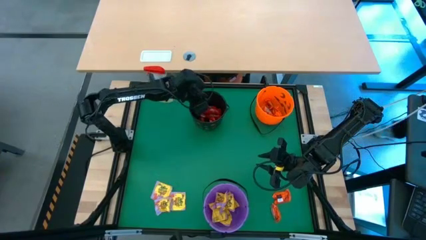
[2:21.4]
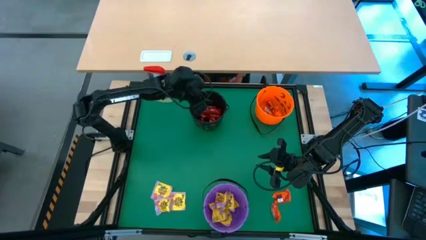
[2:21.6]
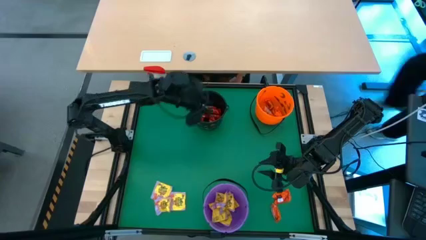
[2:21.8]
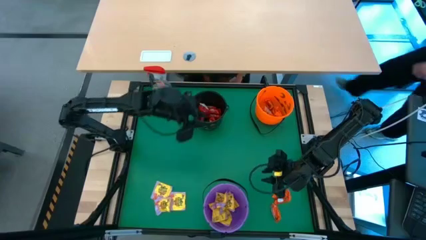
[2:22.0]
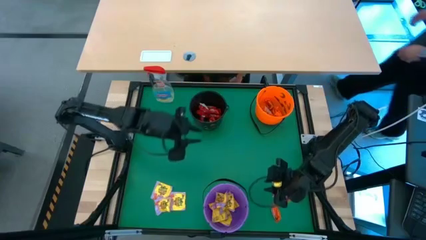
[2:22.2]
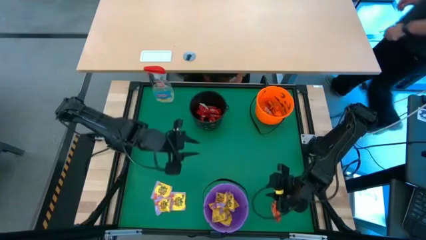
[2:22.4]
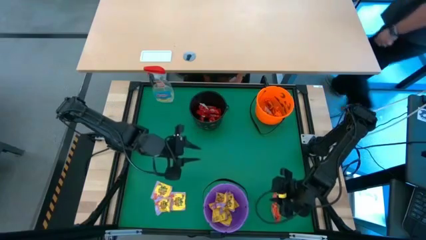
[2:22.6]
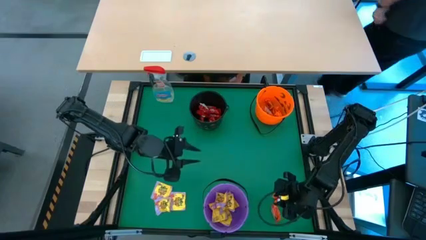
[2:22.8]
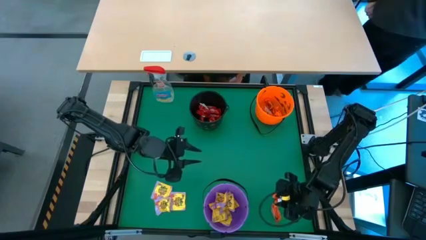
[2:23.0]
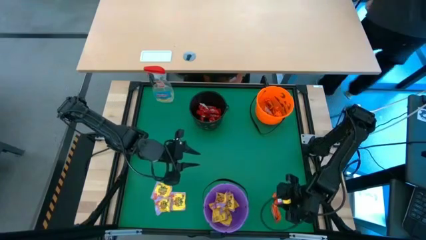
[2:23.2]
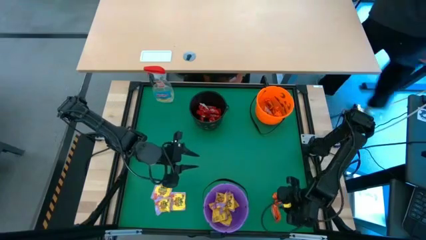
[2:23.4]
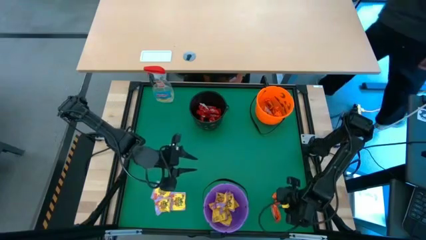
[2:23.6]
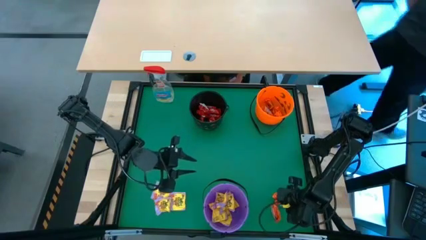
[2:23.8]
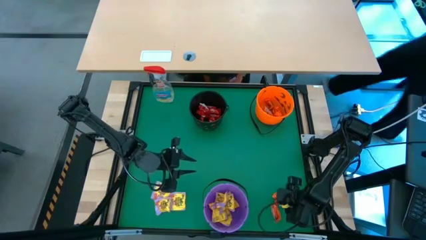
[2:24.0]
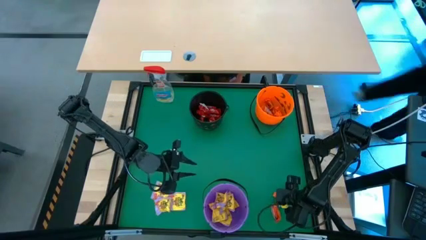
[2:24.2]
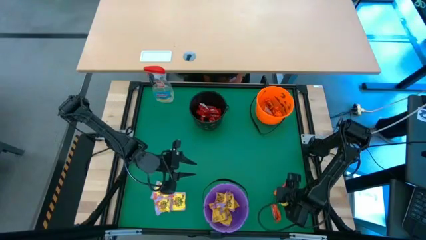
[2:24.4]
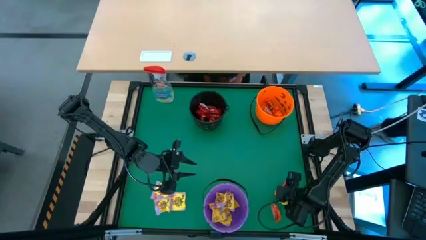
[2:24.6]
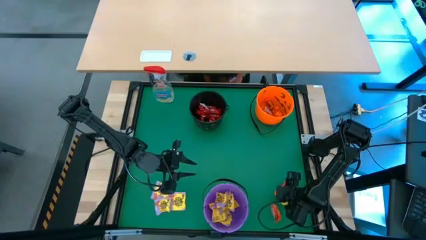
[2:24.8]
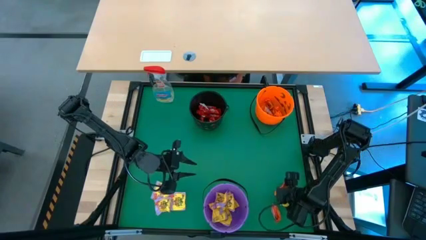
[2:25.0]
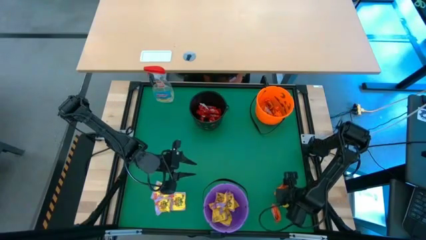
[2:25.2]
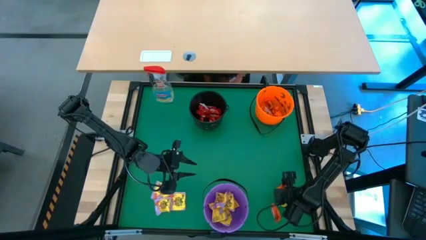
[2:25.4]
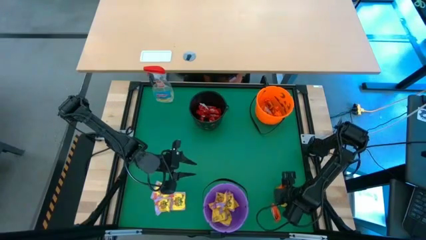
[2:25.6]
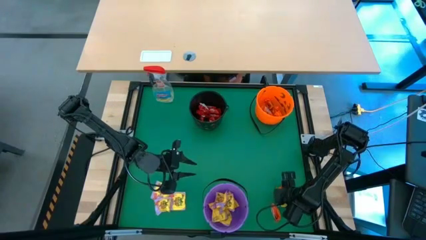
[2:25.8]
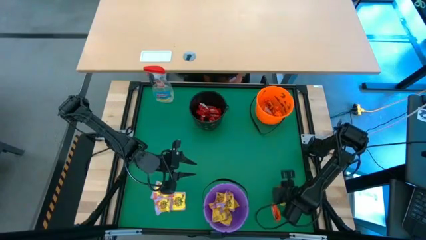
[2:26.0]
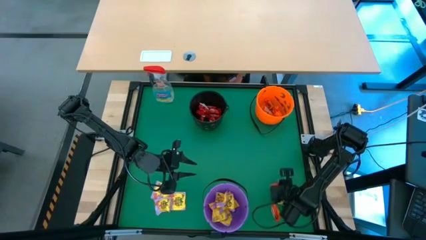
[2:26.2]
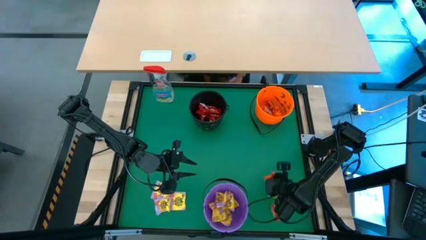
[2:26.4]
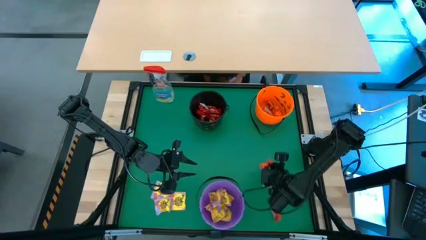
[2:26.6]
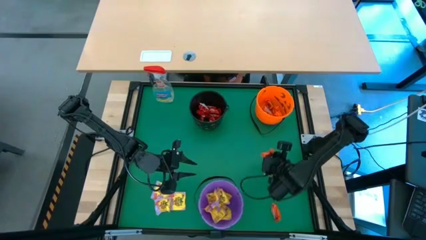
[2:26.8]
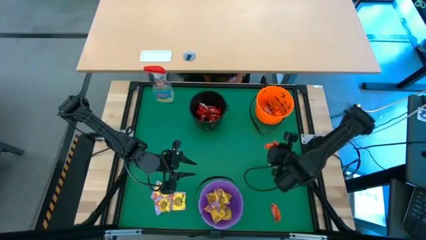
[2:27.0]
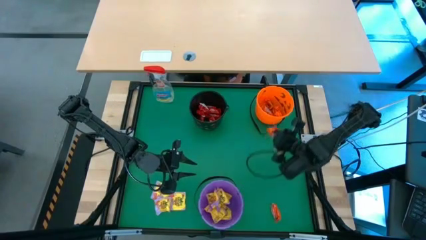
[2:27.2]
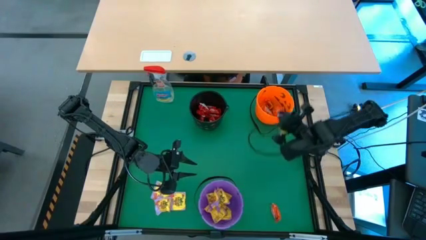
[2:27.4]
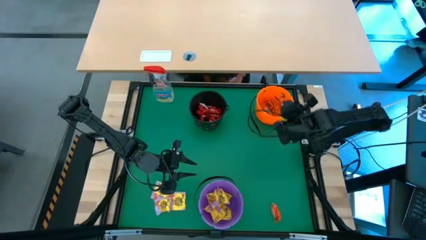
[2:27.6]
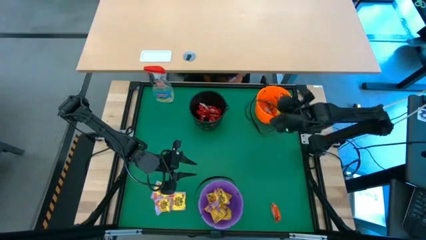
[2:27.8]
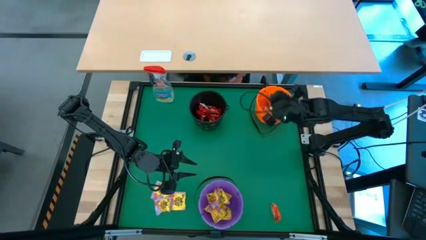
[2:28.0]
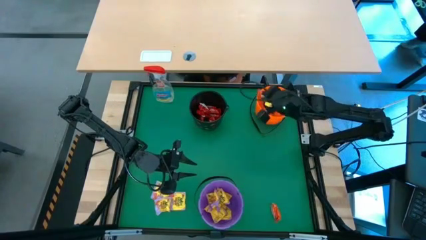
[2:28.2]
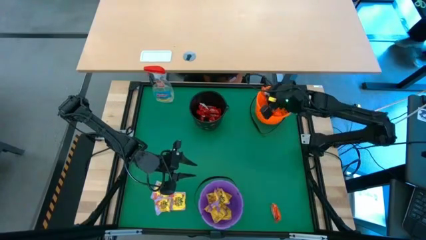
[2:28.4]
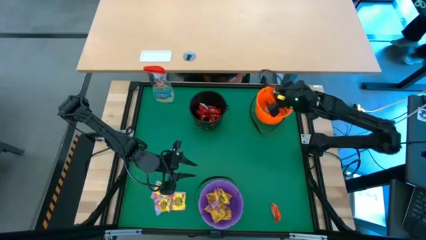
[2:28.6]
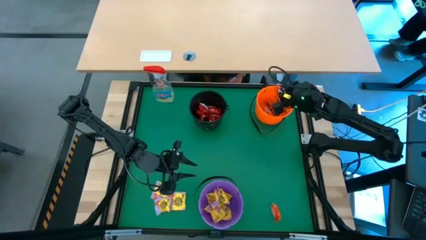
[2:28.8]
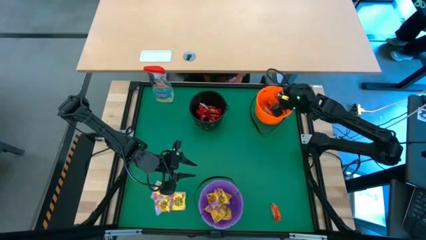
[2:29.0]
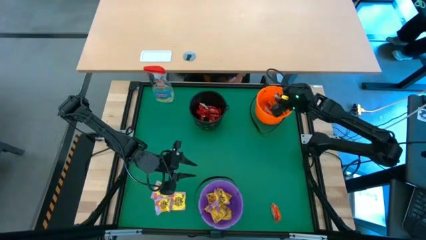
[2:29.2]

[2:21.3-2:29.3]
Task: Sort candy
Put the orange chocolate into the orange bucket

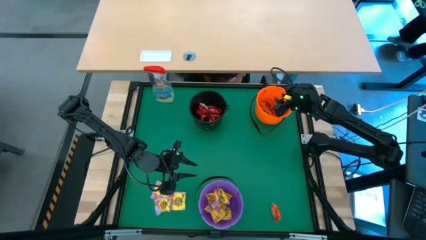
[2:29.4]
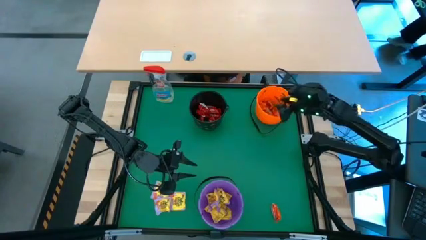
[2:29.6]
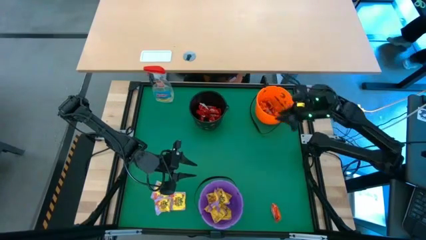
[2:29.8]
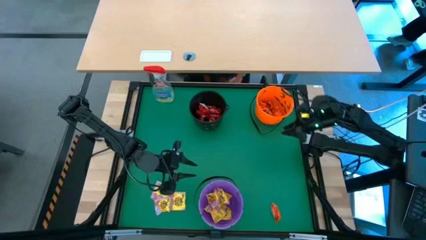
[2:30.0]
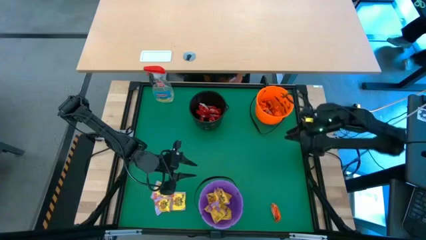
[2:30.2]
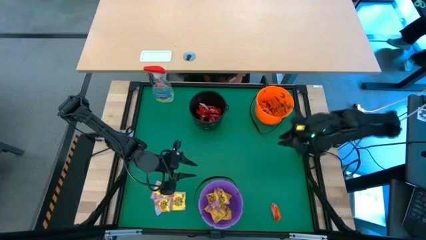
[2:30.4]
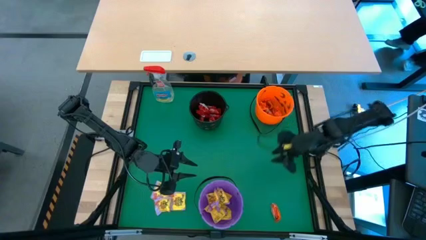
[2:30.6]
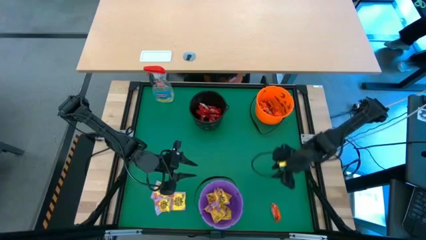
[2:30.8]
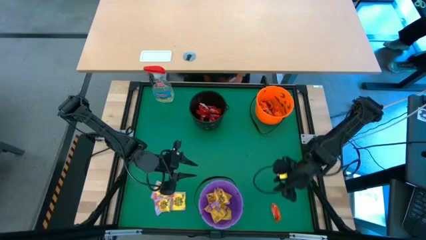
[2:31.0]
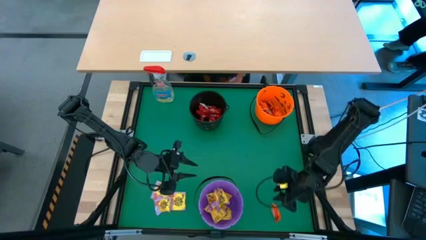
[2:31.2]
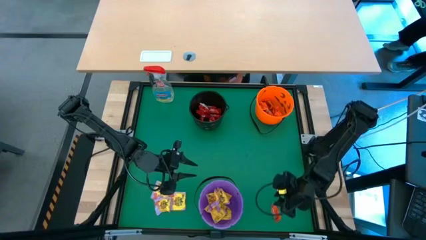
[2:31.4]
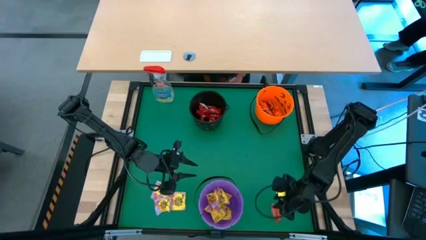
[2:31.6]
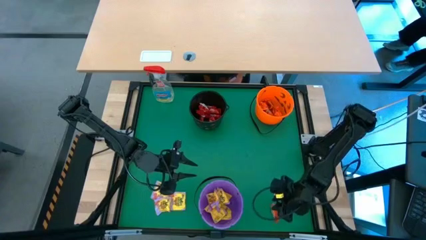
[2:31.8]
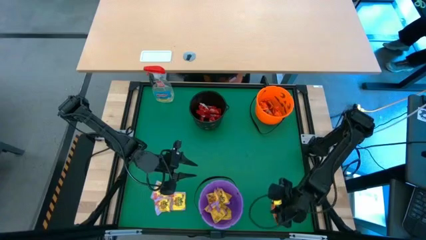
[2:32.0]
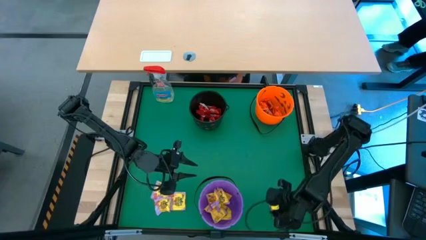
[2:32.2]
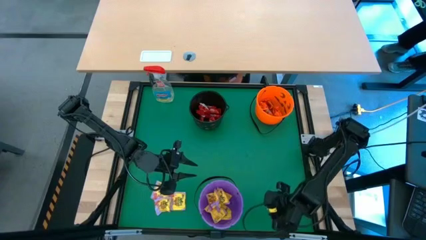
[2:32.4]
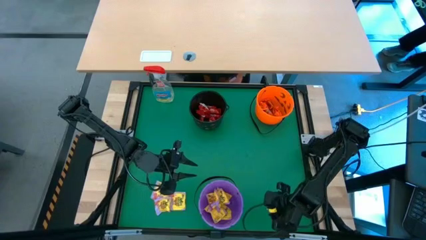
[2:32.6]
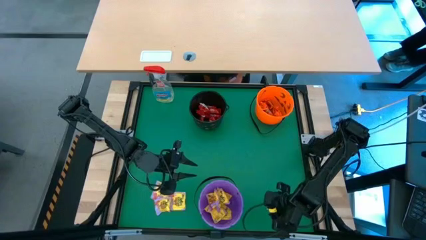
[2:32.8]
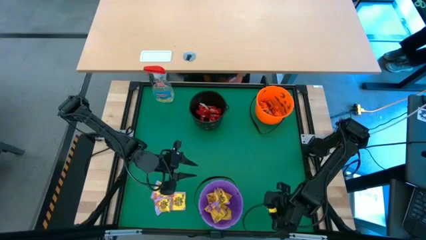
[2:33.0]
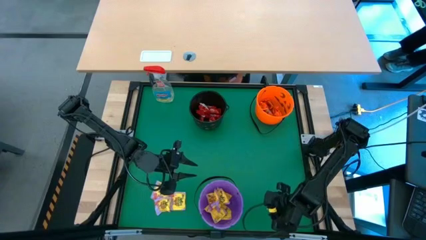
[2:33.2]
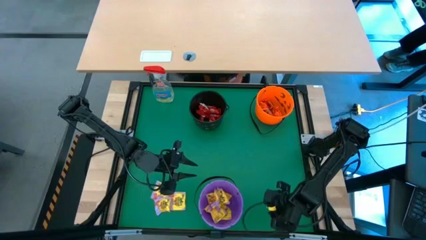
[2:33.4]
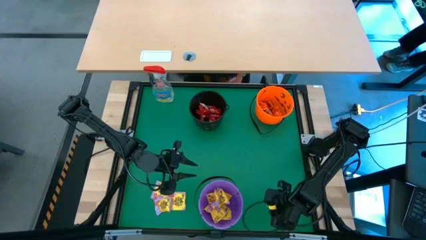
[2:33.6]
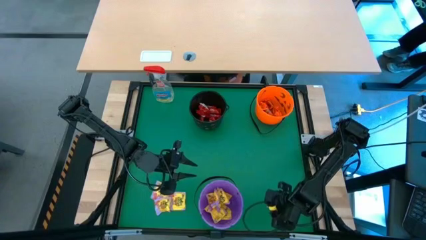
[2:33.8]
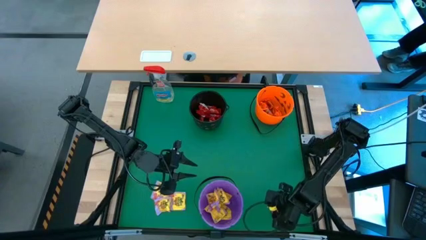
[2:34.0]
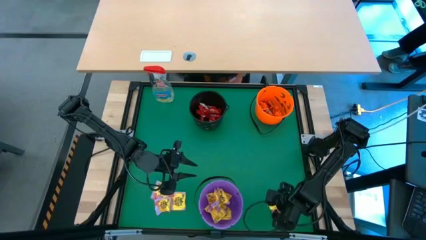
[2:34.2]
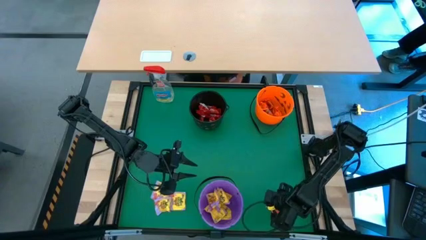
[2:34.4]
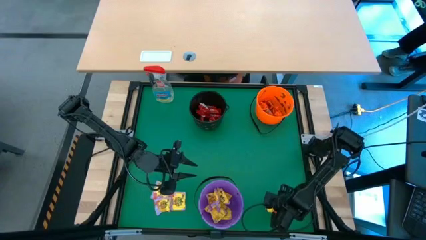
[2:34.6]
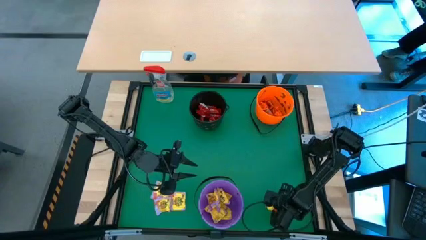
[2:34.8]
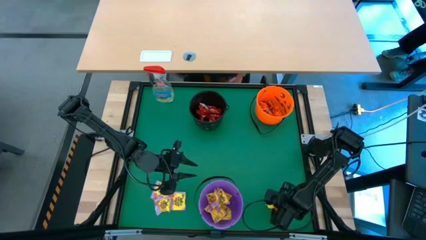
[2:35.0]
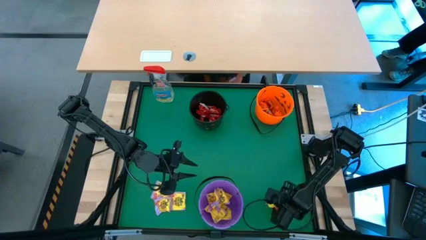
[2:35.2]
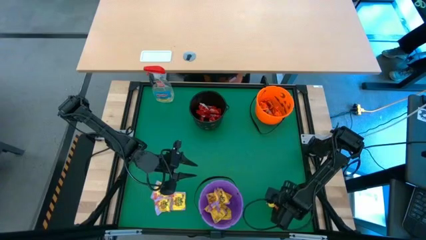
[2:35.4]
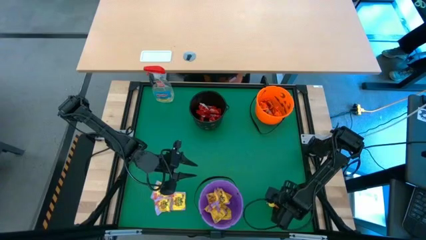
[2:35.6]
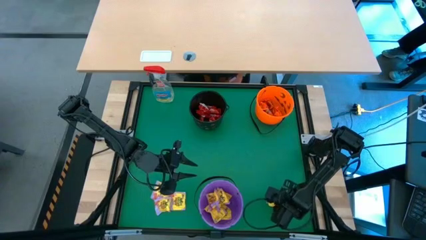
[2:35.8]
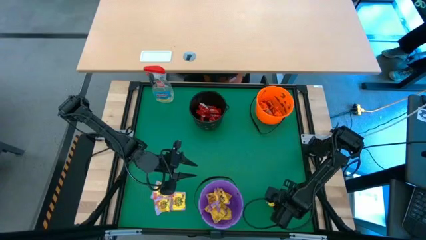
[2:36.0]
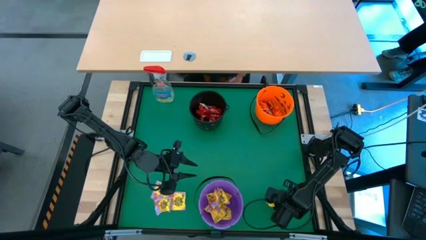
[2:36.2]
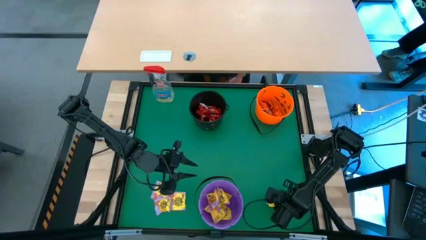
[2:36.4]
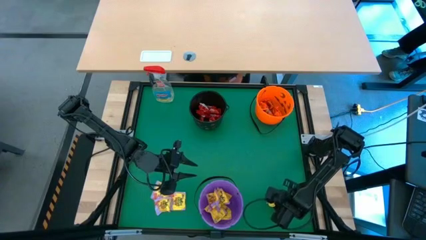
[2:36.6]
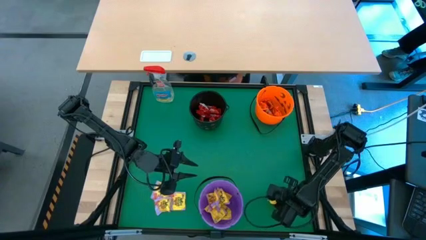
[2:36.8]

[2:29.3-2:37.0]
Put the orange chocolate into the orange bucket

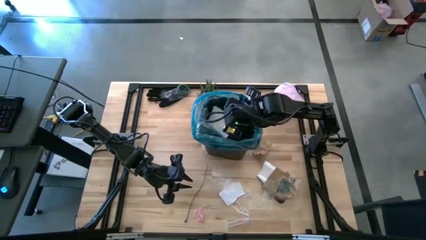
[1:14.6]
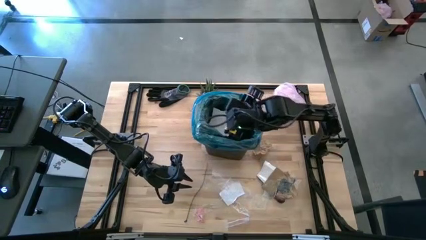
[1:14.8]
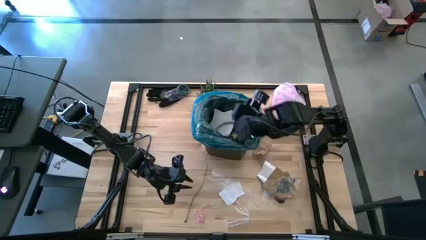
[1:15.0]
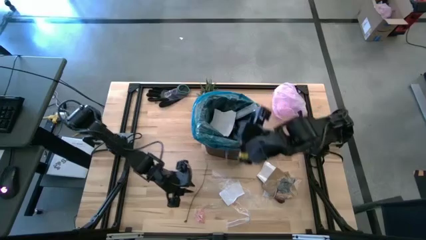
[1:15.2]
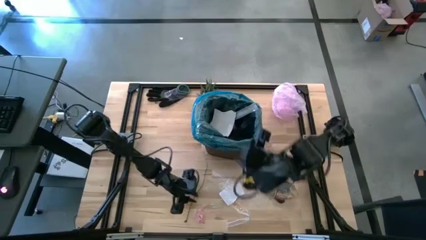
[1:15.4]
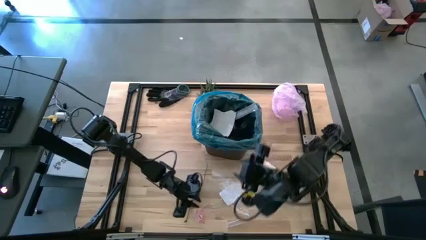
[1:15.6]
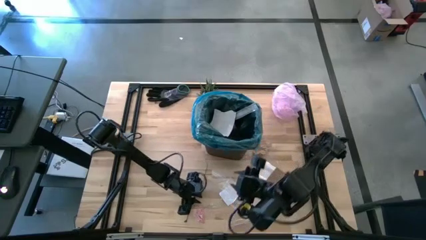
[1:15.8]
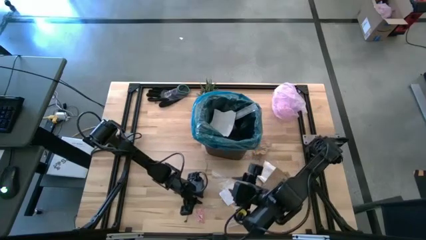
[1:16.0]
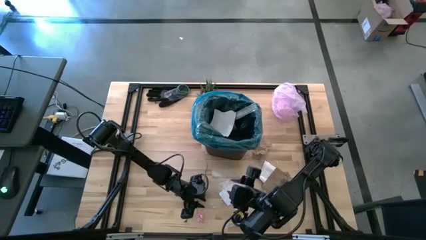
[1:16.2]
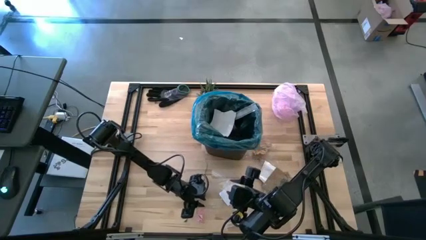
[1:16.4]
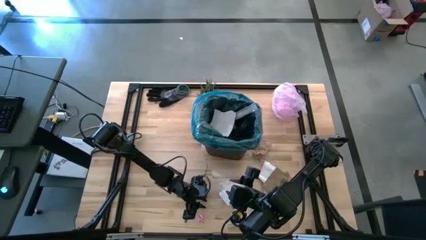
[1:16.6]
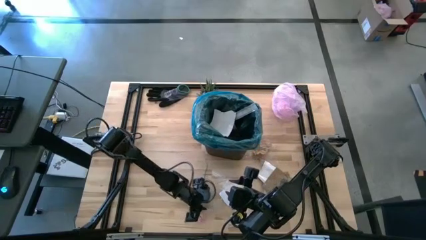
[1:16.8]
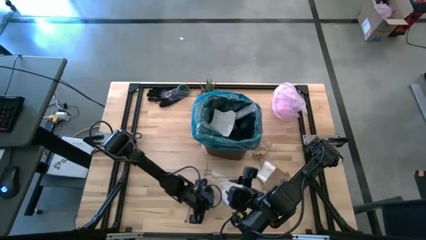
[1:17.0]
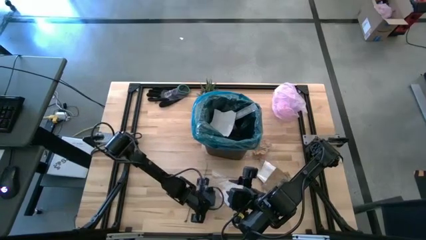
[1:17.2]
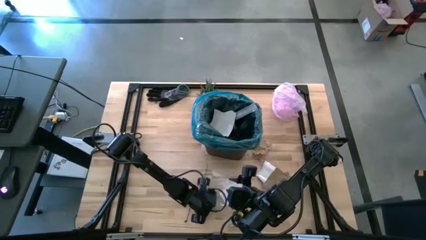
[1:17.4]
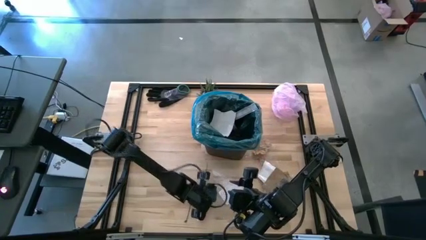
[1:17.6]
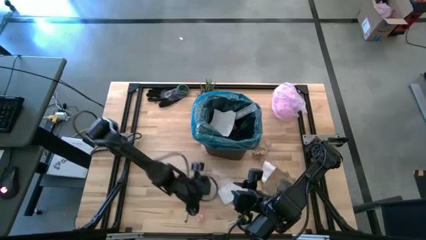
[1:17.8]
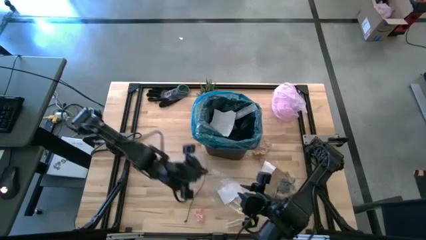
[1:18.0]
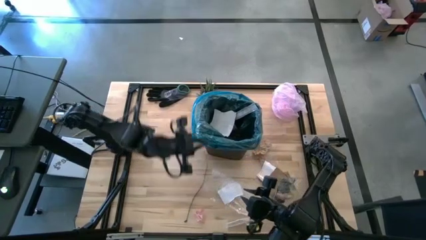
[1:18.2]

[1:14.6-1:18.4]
Task: place trash/remove bag and relplace
Put the transparent plastic into the trash bin
